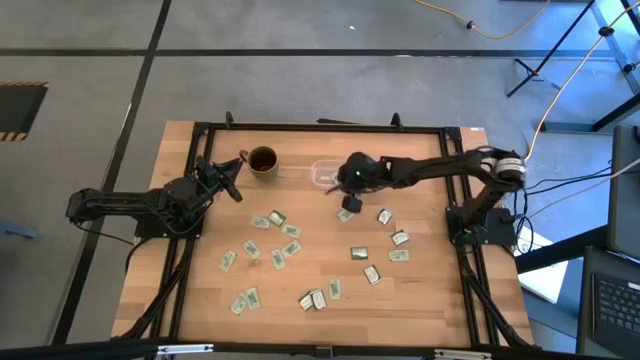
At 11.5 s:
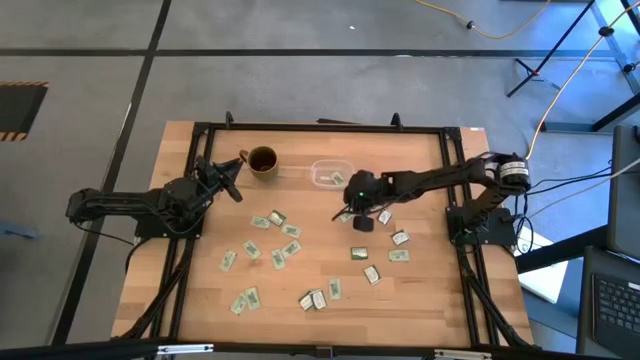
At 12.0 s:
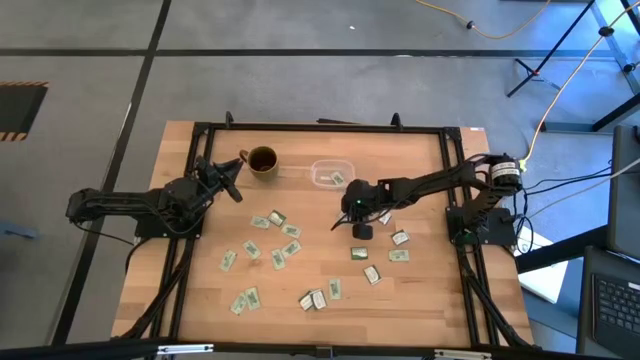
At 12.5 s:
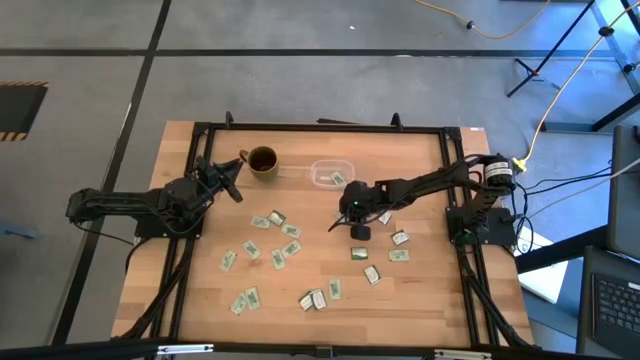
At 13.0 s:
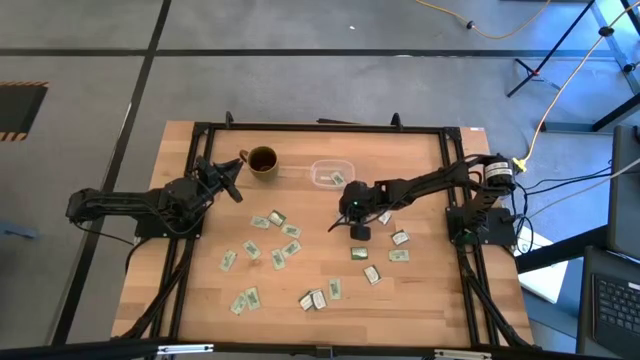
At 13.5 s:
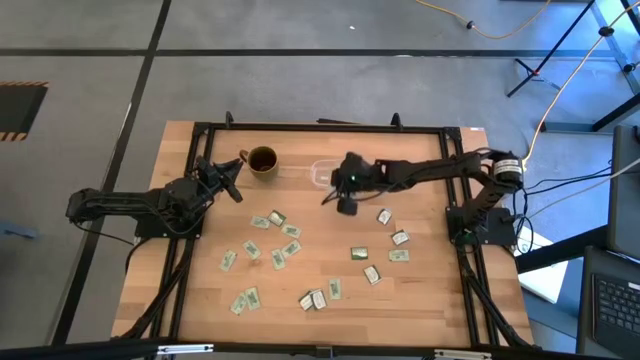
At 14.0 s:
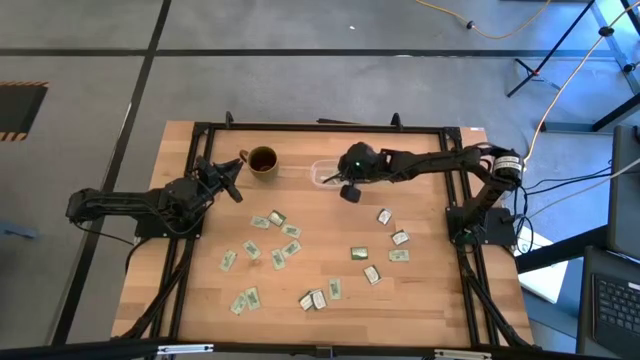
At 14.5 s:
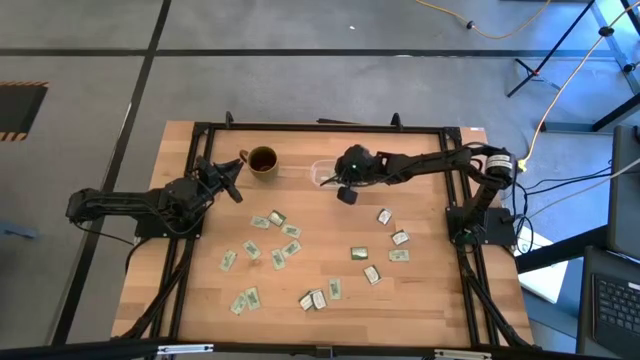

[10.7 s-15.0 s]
Task: Pick and place Stevia / Truvia into bins
Put the stevia packet into the transparent container

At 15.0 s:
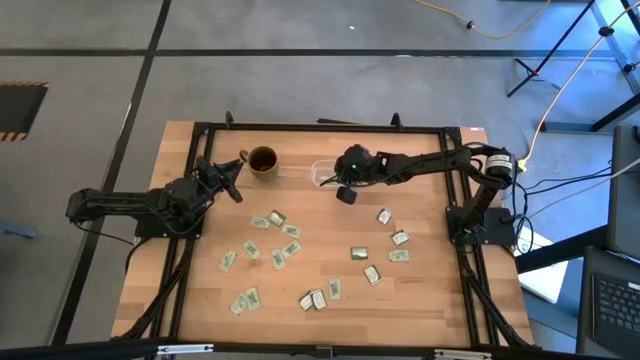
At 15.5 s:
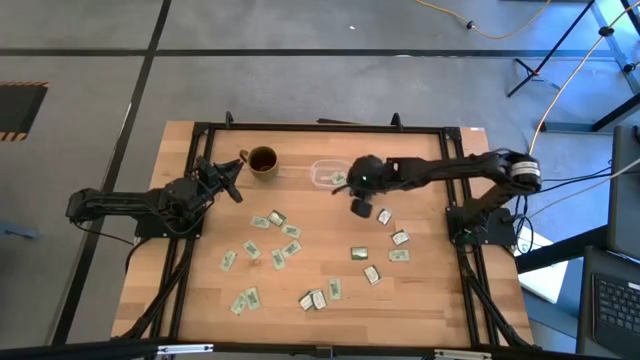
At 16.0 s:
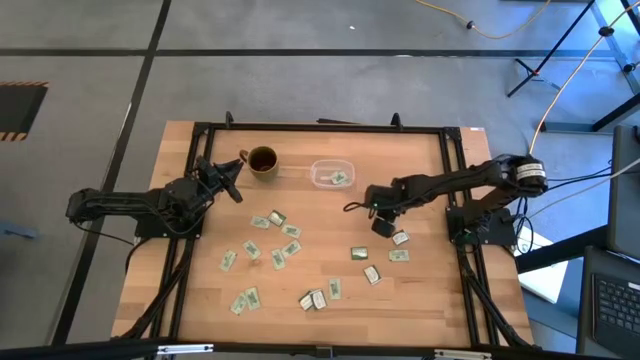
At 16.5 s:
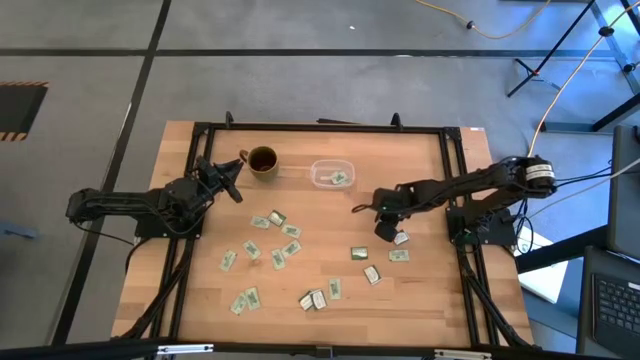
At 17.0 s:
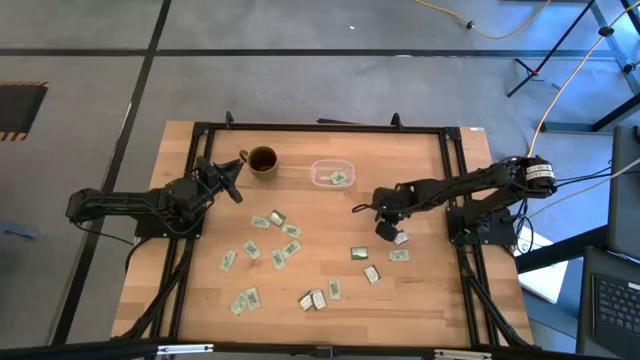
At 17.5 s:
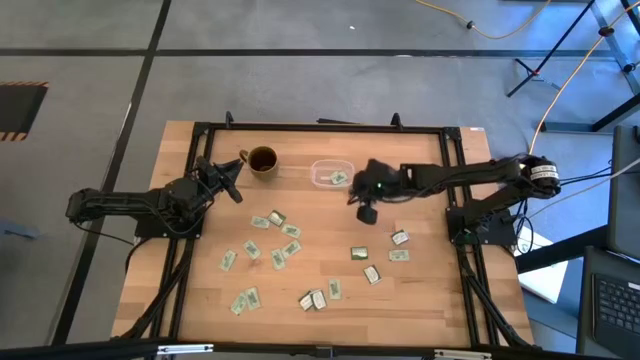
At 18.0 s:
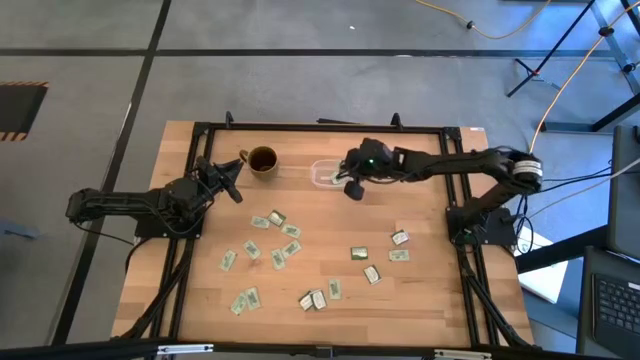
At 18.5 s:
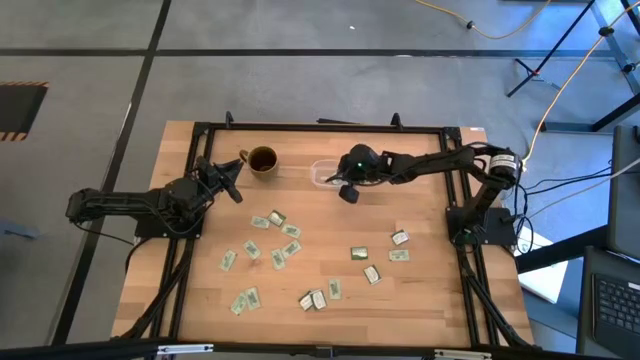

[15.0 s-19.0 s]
Put the truvia packet into the transparent container

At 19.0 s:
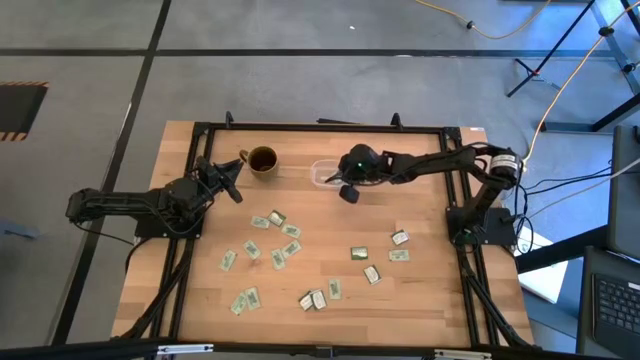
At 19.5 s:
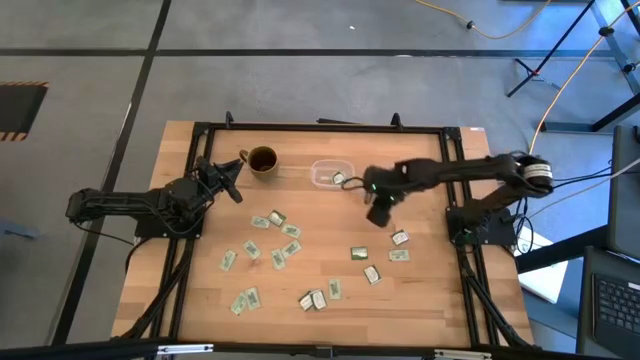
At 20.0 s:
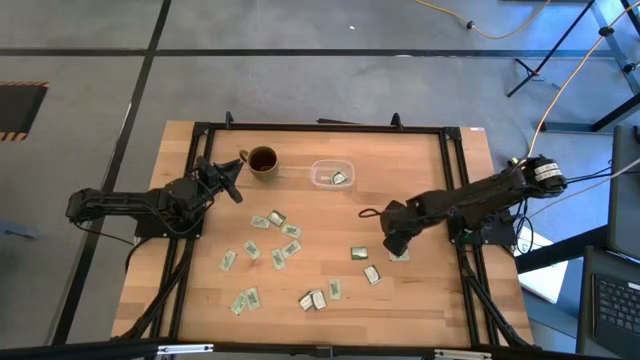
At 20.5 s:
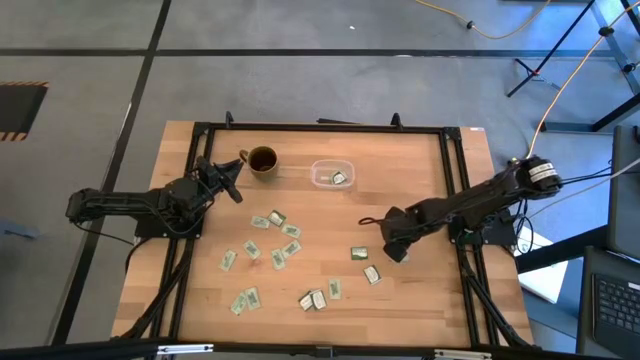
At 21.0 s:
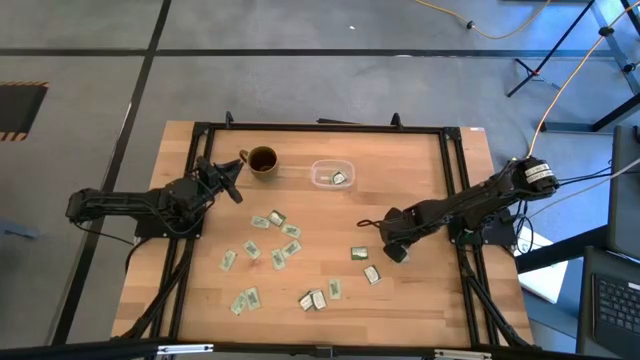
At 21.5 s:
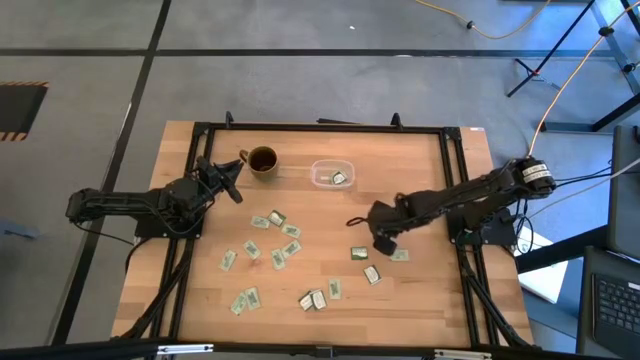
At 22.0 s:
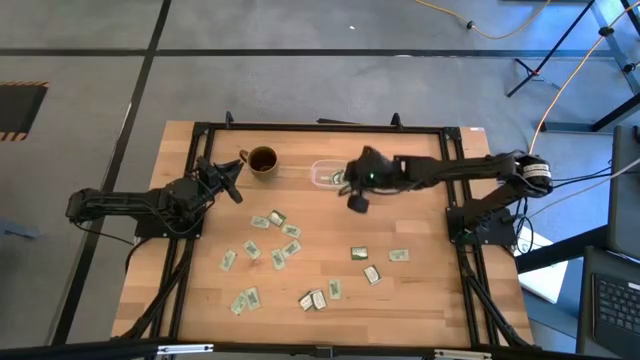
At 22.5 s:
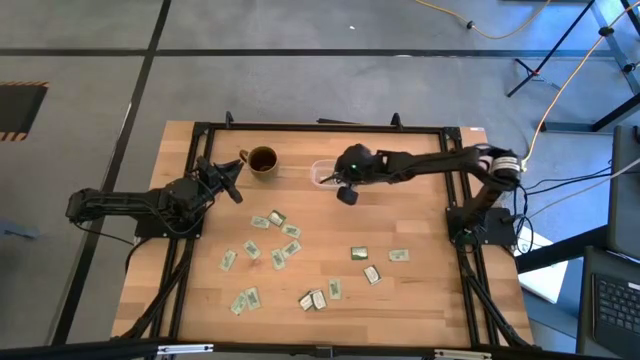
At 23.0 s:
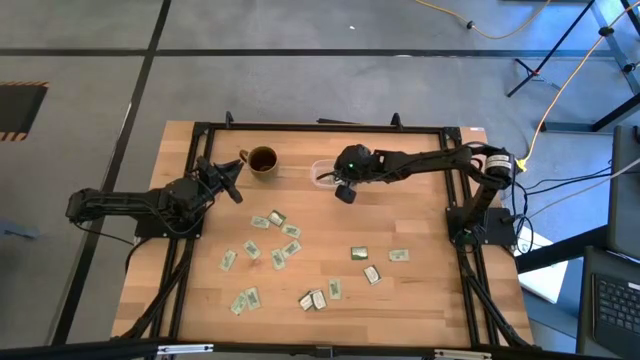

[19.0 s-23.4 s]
Put the truvia packet into the transparent container

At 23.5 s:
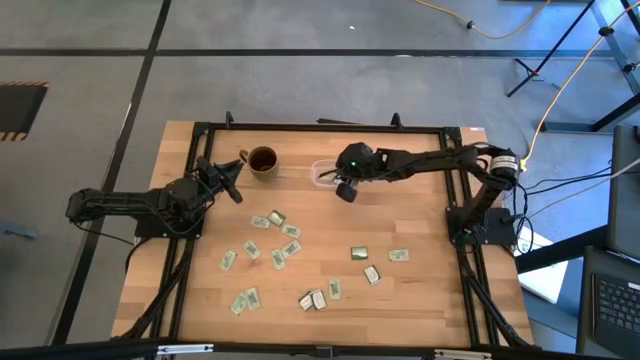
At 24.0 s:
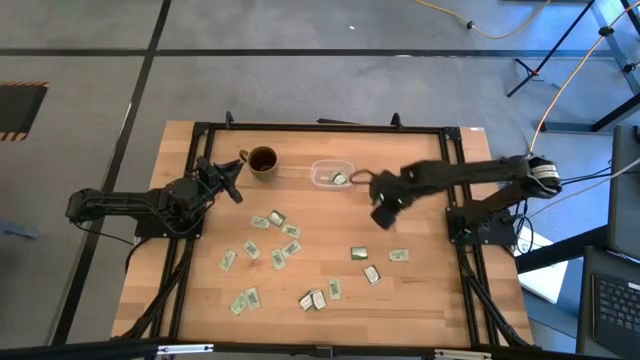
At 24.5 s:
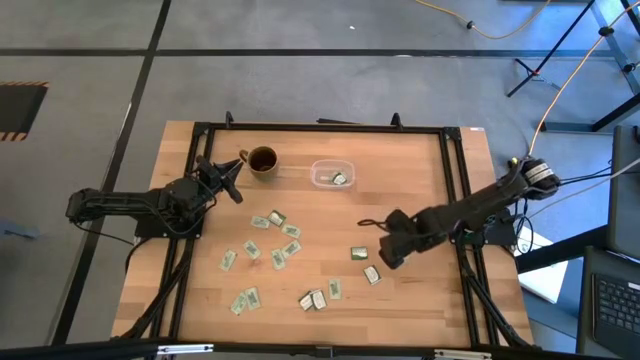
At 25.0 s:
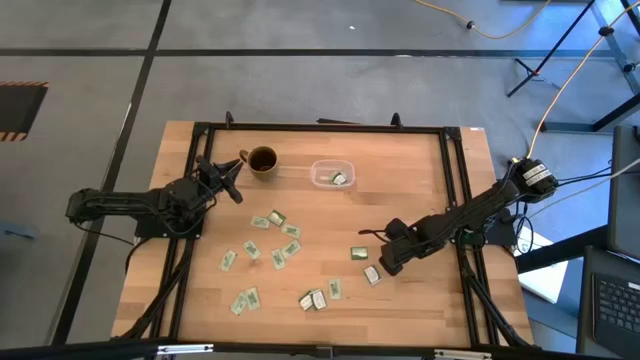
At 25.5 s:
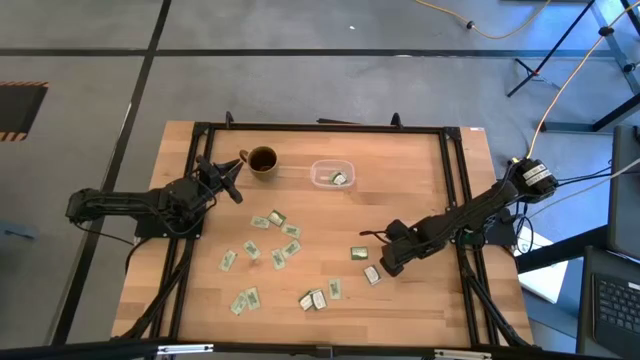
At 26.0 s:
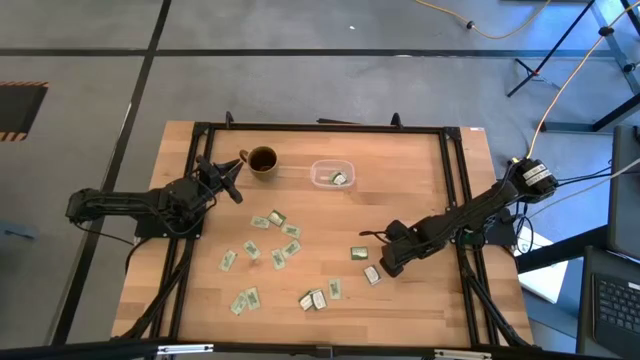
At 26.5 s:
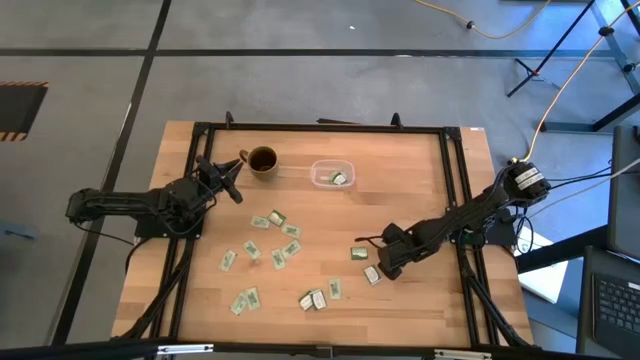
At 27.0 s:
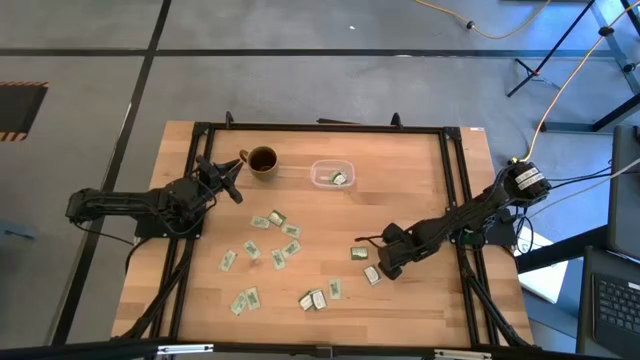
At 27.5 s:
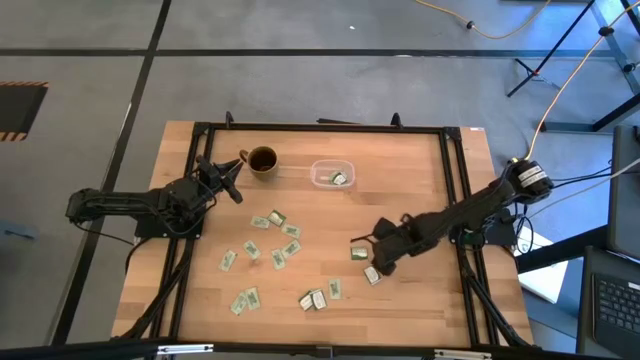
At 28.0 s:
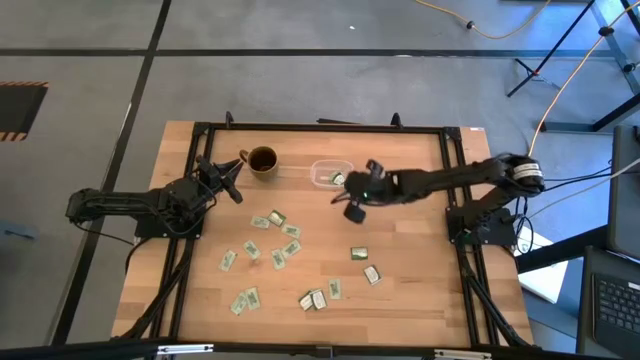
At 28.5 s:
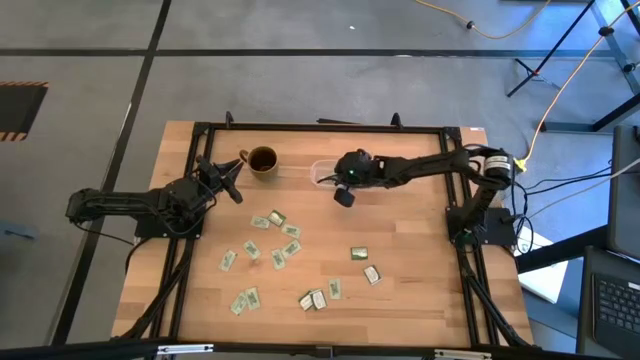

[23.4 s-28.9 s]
Put the stevia packet into the transparent container

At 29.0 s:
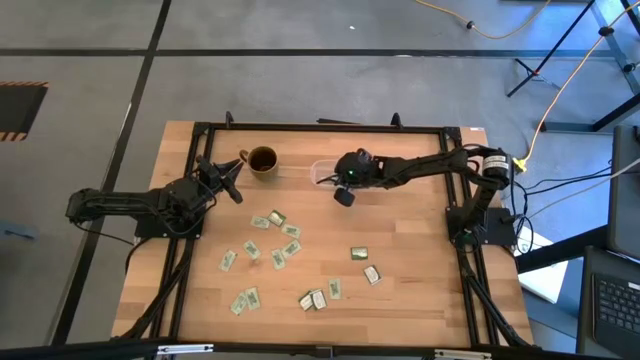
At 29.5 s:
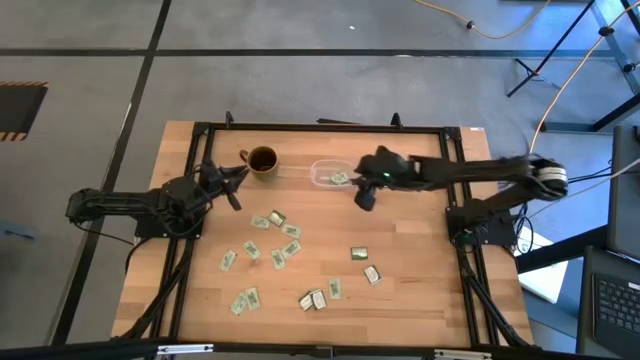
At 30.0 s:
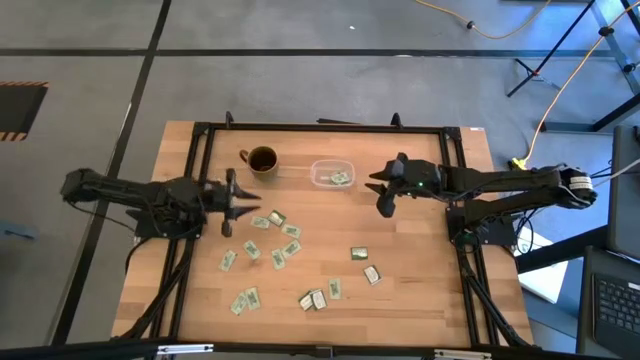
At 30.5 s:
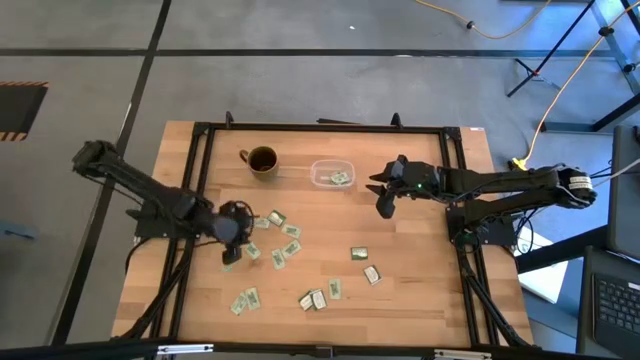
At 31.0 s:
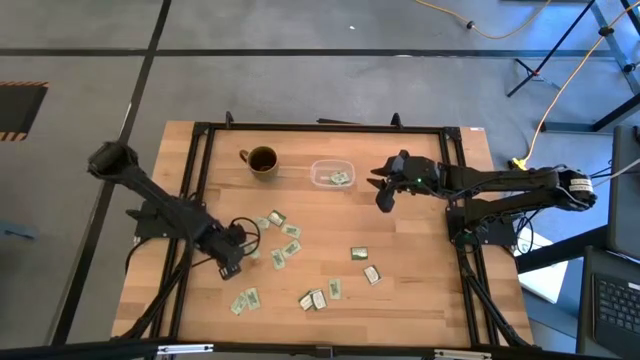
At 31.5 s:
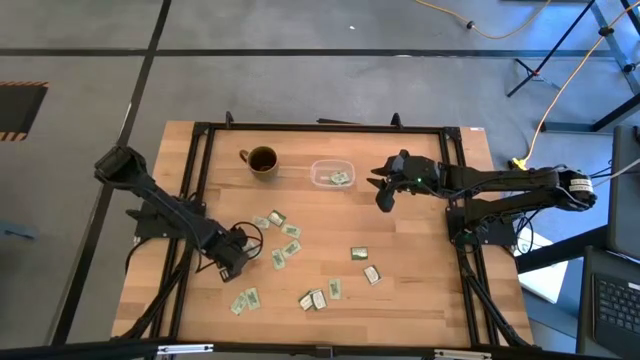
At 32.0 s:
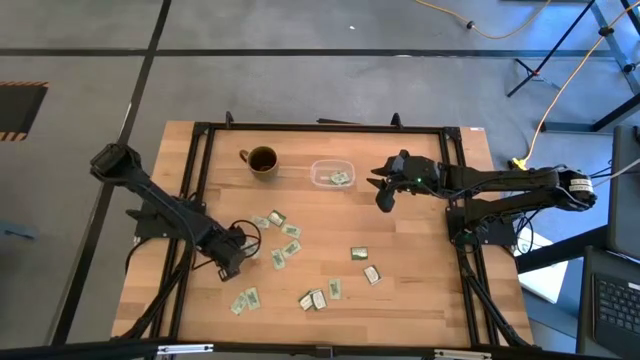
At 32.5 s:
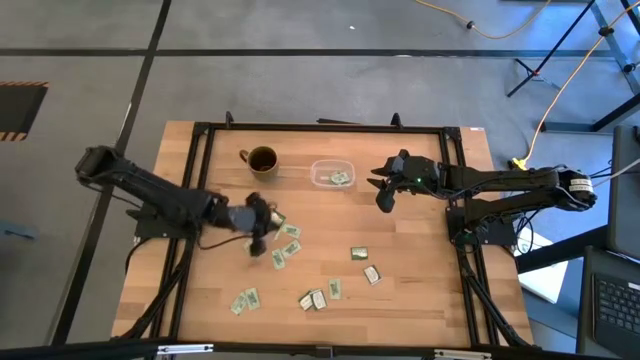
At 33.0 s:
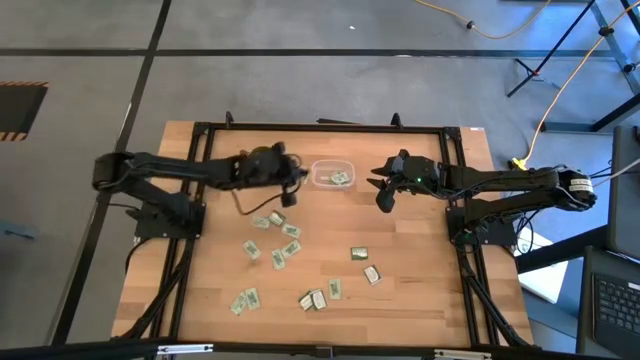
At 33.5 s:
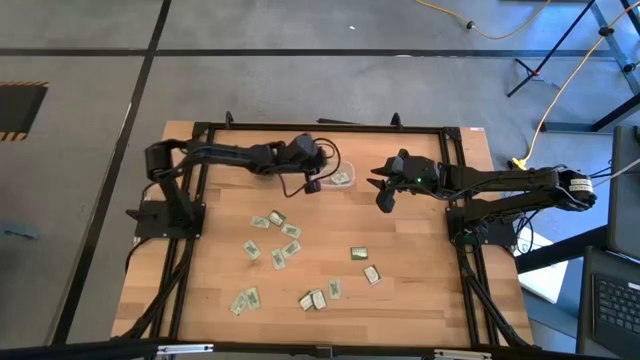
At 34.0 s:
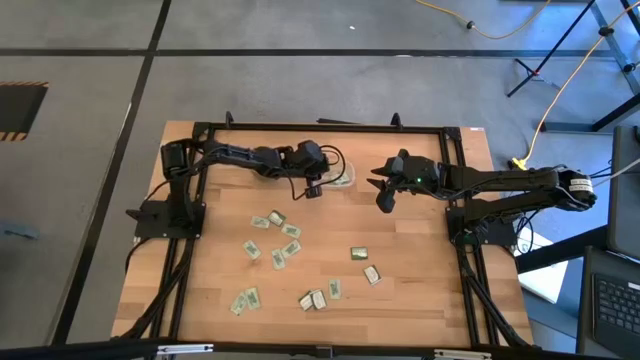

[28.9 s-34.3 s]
Put the stevia packet into the transparent container
